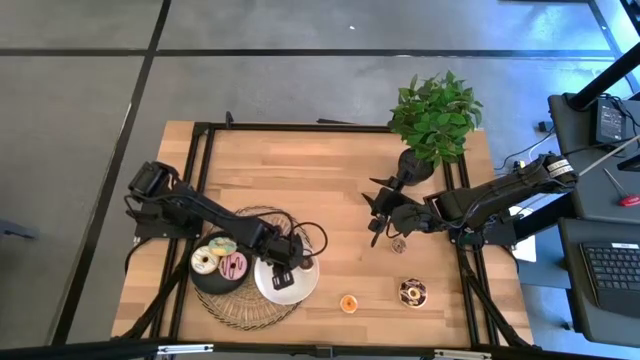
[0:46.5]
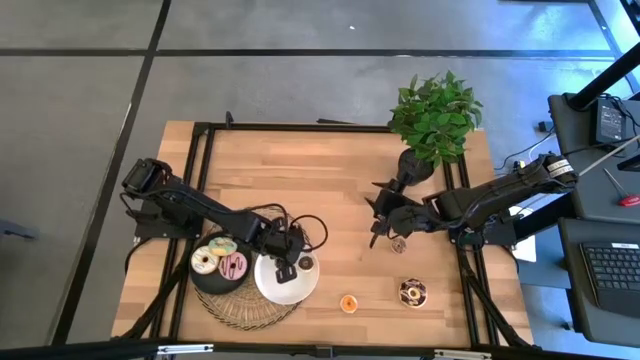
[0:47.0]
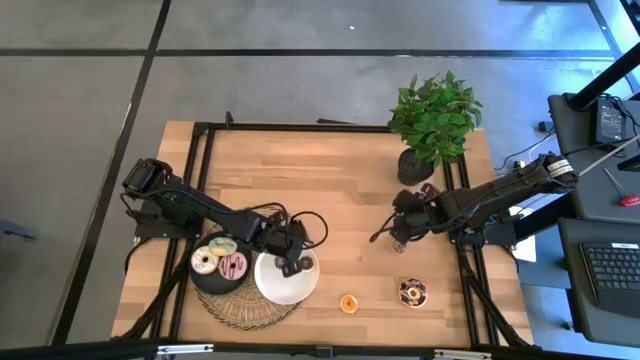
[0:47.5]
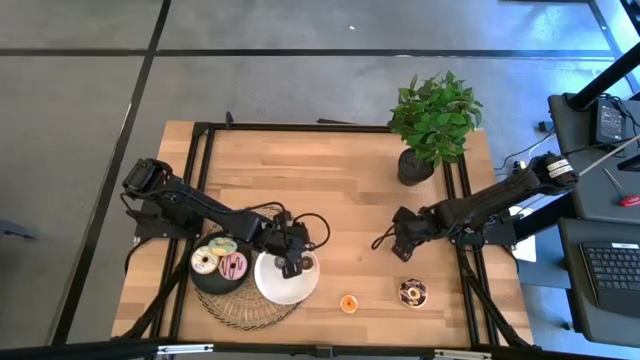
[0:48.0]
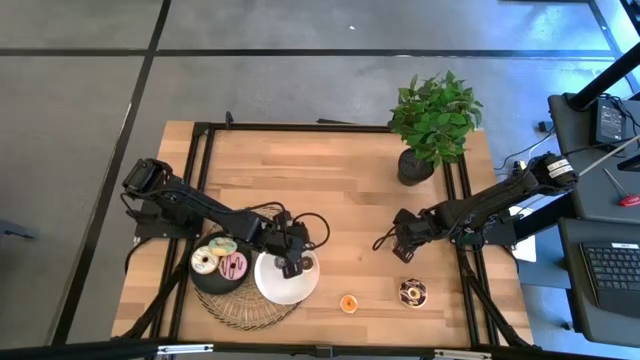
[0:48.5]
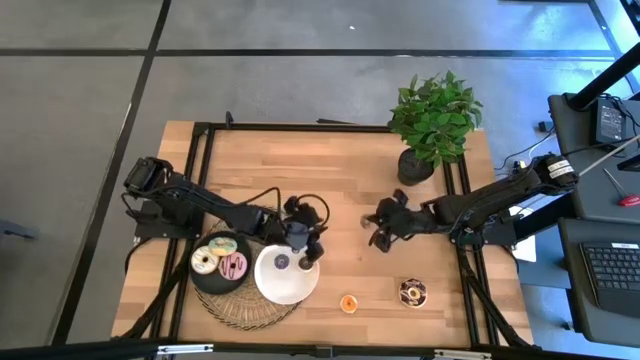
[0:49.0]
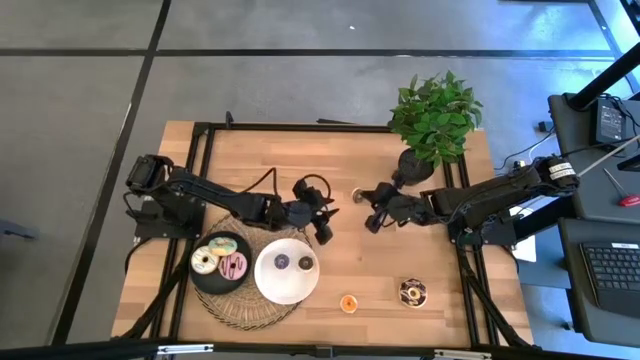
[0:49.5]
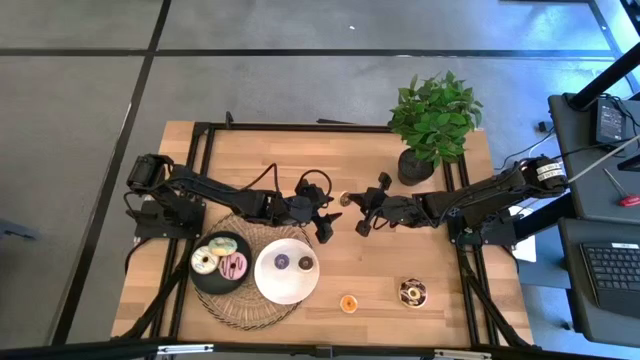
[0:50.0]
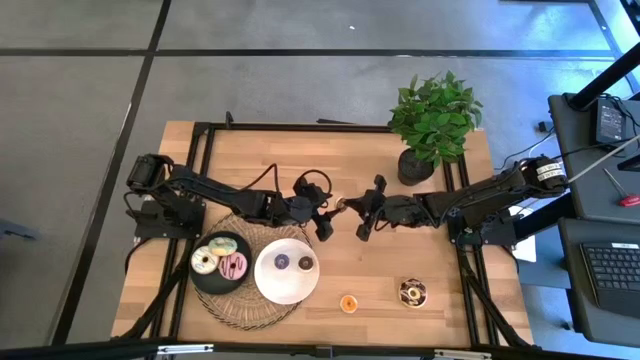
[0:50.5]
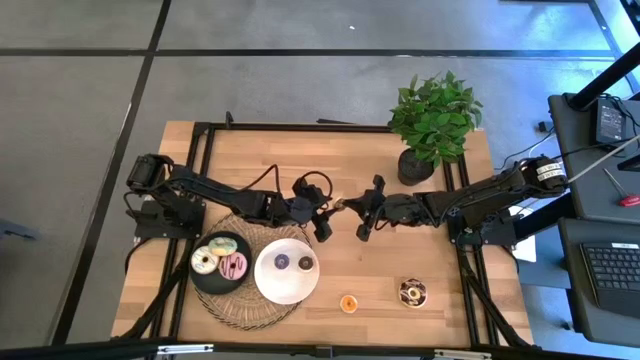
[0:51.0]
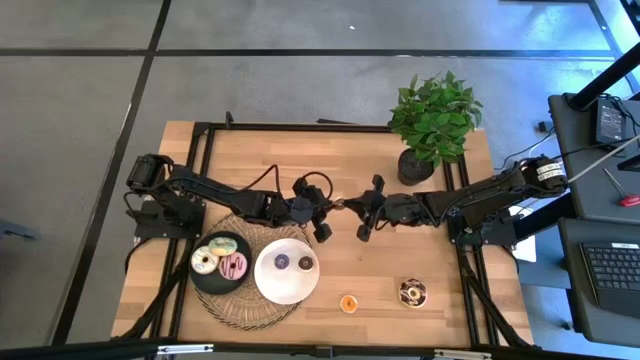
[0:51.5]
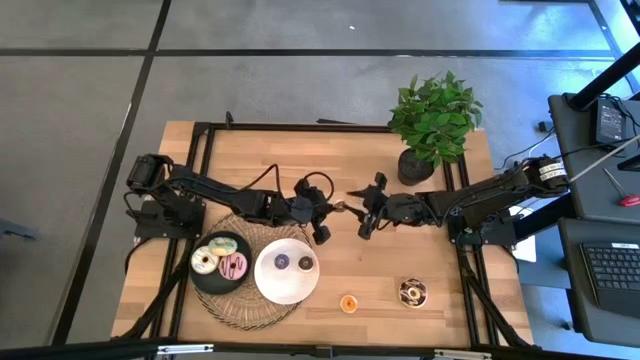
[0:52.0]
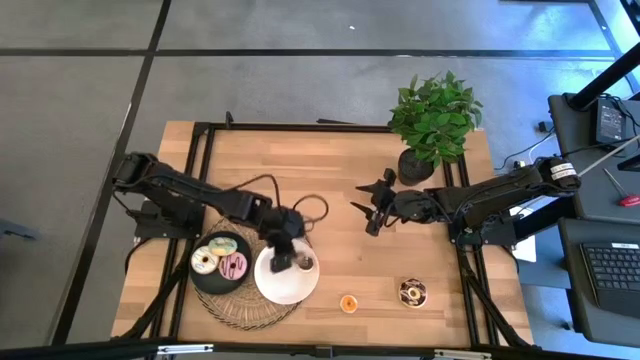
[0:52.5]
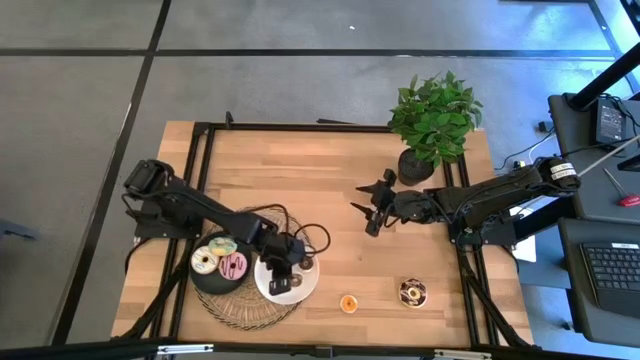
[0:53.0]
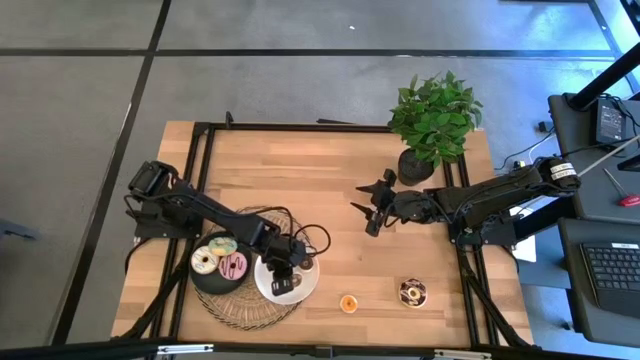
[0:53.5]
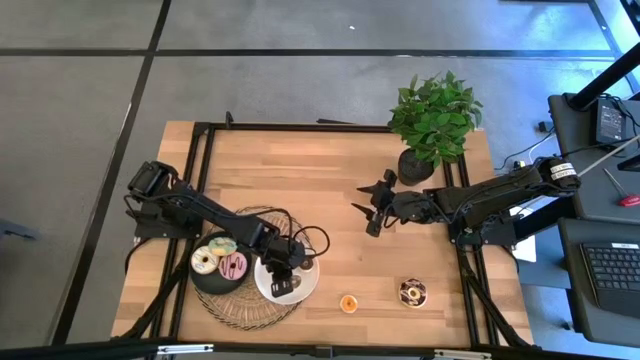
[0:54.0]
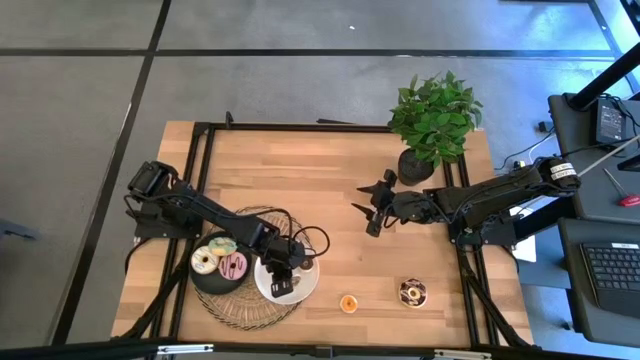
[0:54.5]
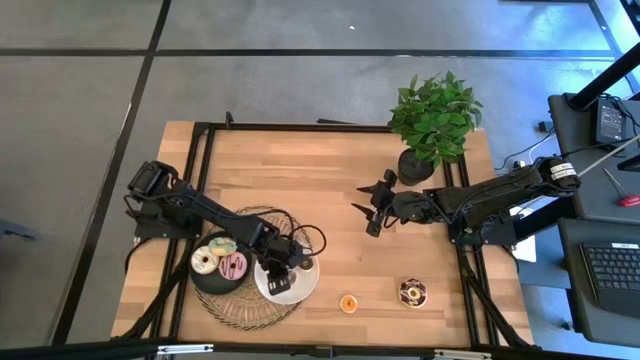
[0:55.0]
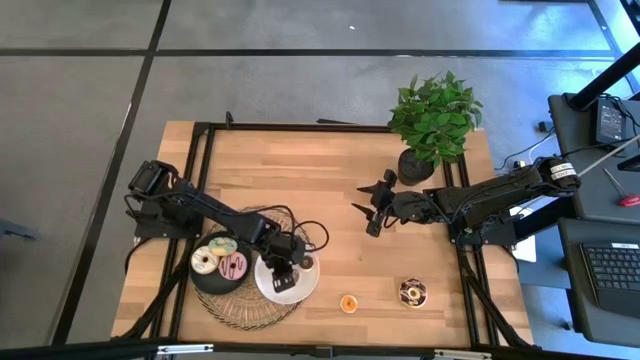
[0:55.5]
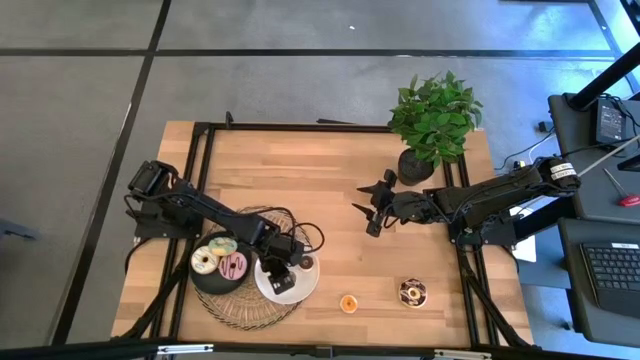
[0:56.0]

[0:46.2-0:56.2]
Task: Pick & Place donuts
Put the small brown donut on the white plate

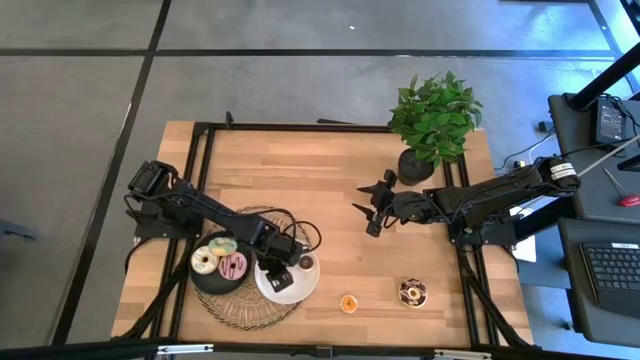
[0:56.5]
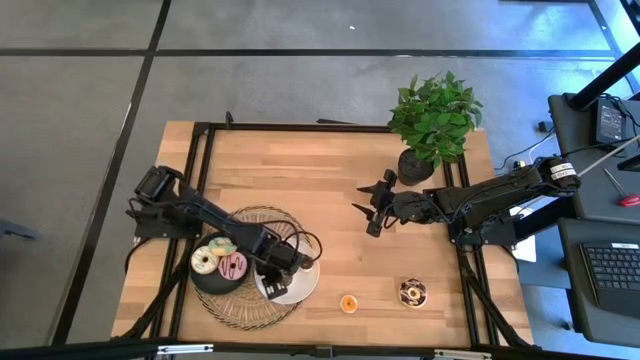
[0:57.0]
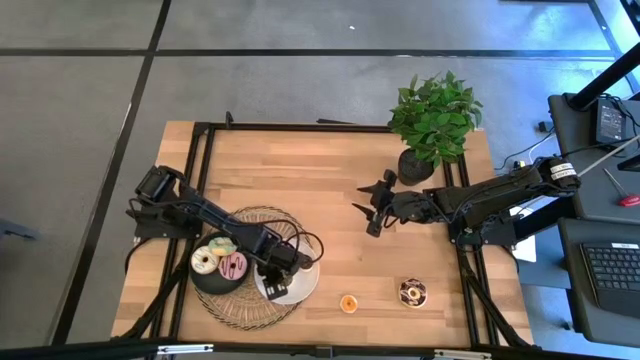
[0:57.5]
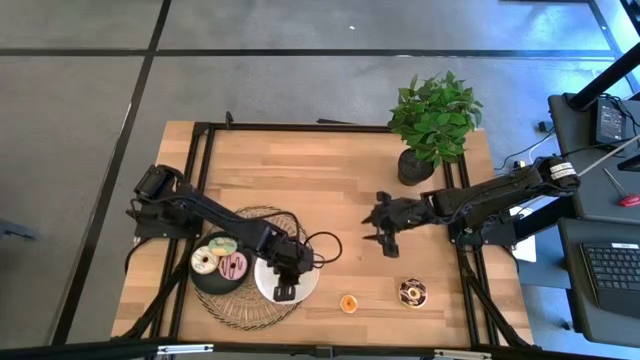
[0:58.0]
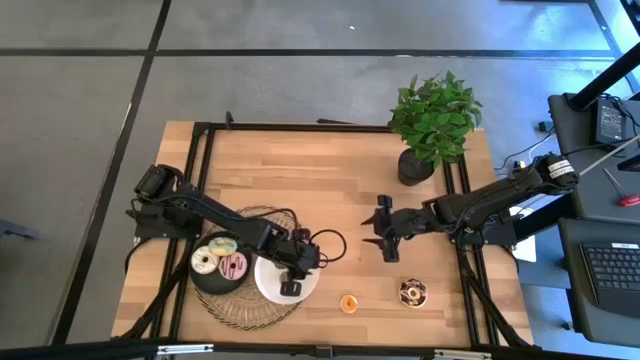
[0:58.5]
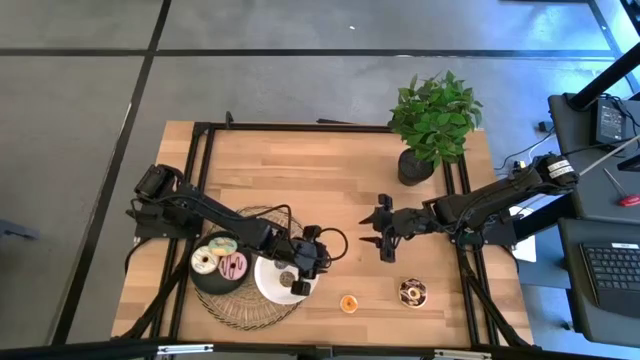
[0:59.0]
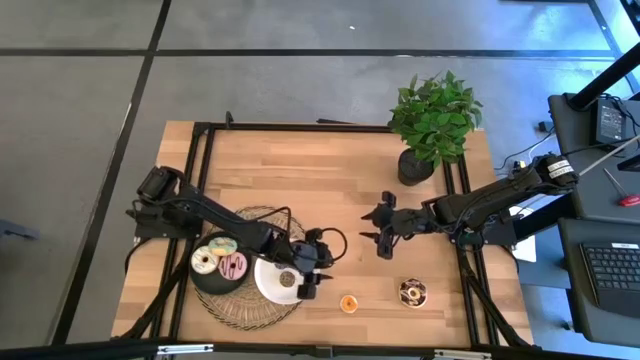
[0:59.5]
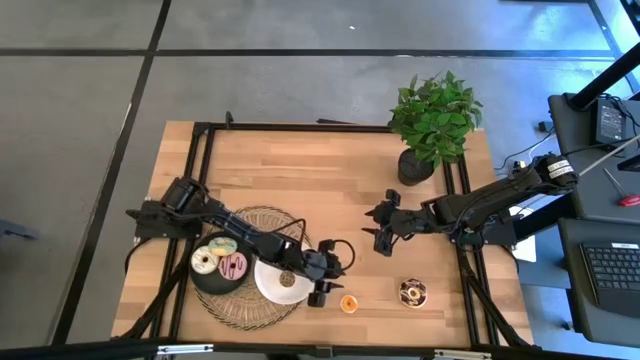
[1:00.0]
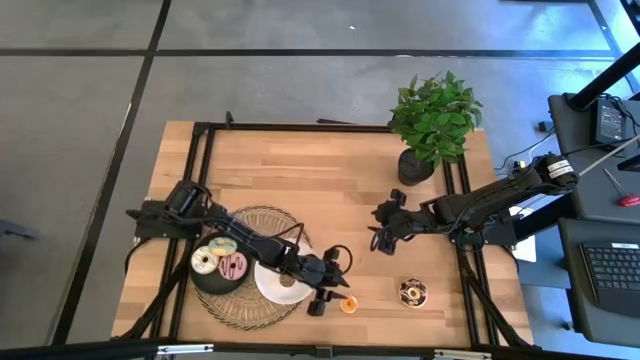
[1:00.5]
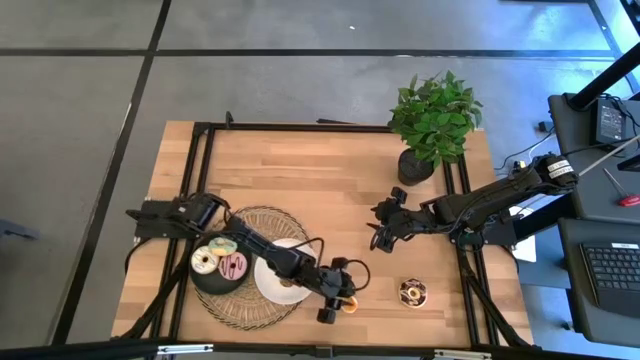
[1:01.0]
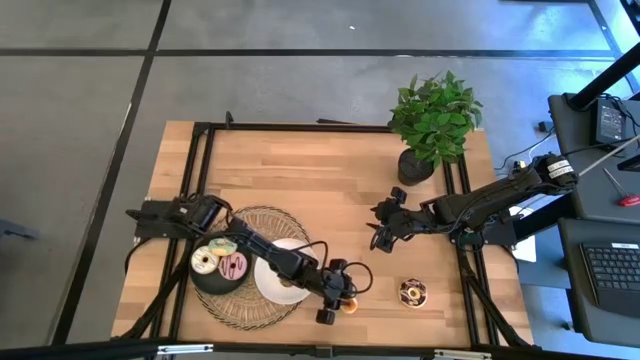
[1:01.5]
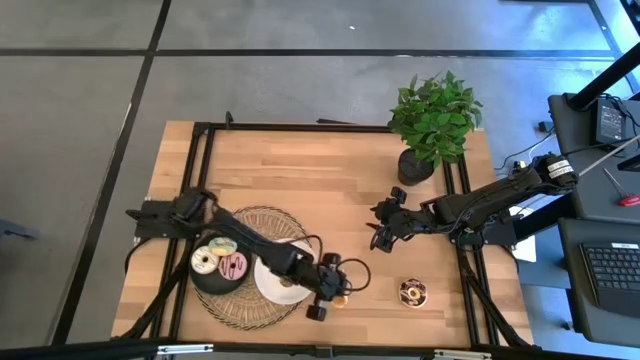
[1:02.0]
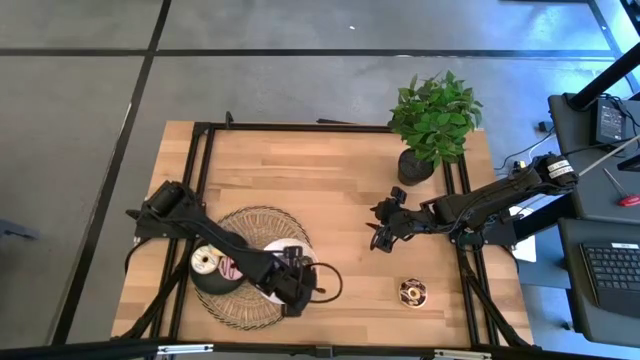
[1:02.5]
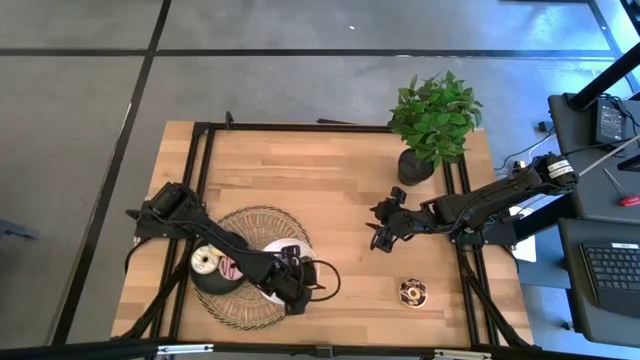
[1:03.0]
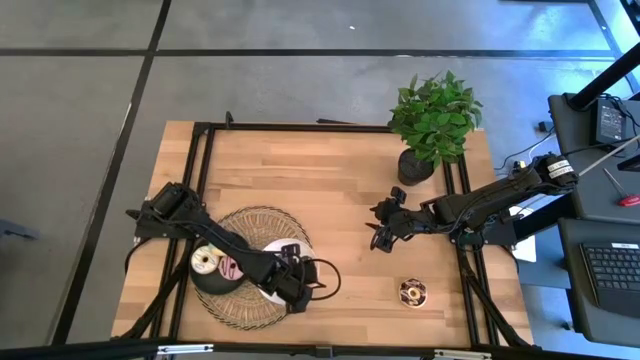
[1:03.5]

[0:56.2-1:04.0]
Put the small yellow donut on the white plate

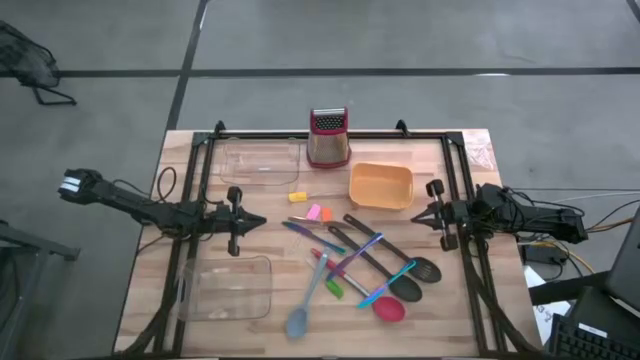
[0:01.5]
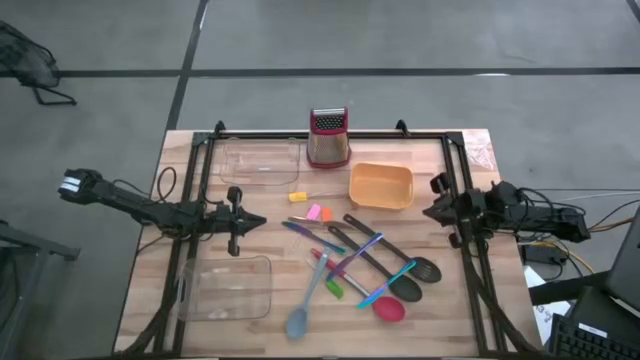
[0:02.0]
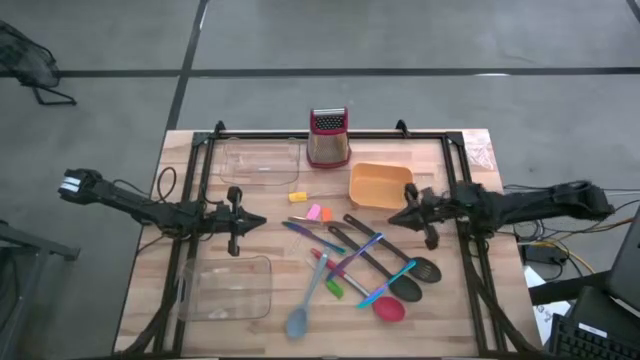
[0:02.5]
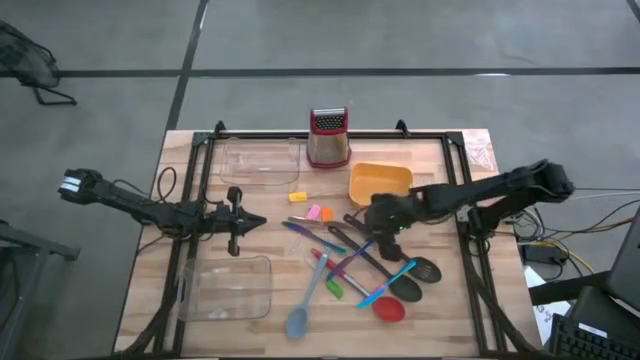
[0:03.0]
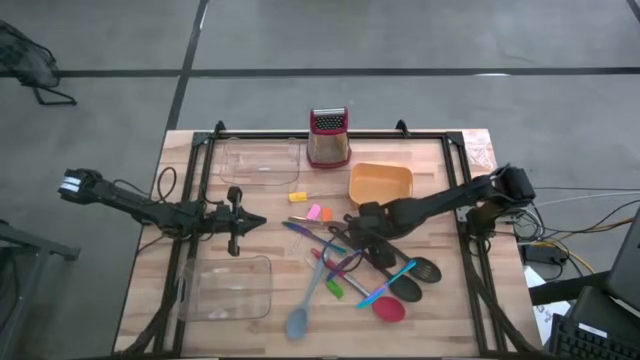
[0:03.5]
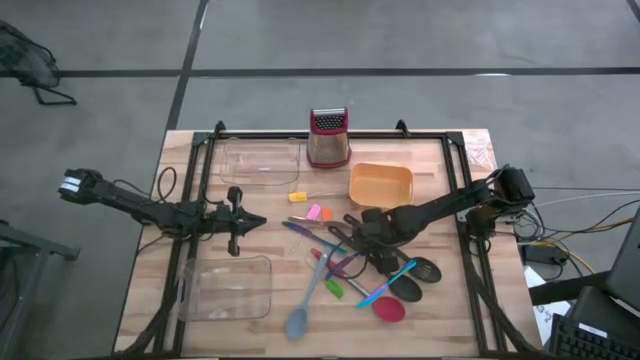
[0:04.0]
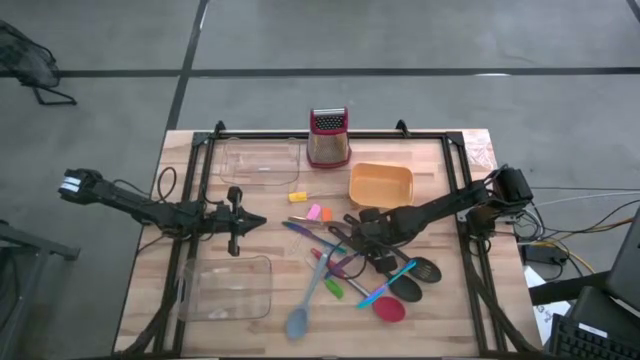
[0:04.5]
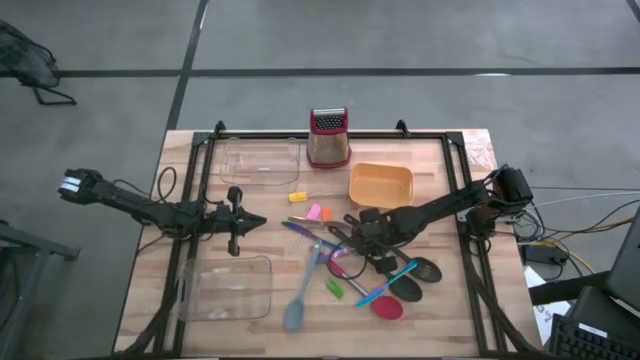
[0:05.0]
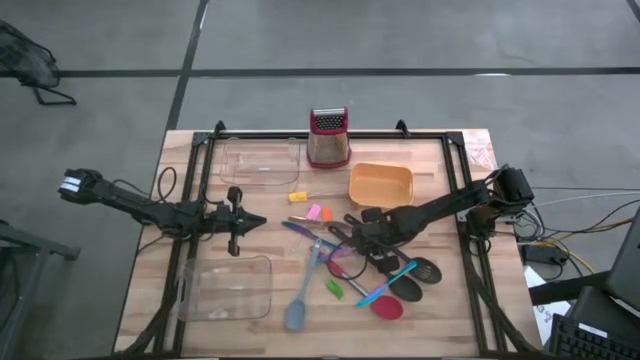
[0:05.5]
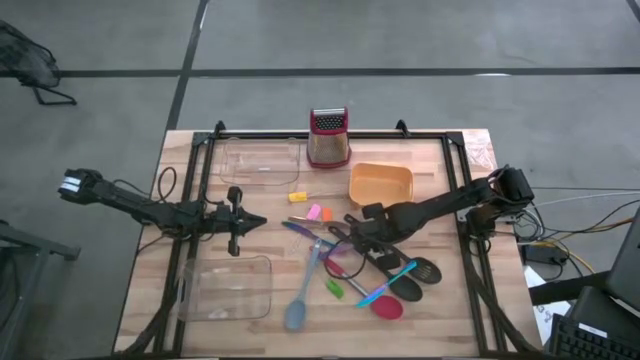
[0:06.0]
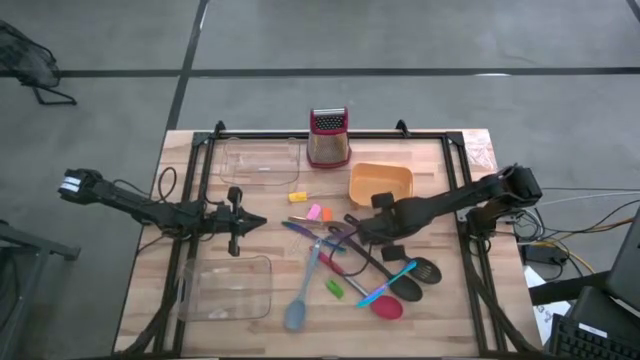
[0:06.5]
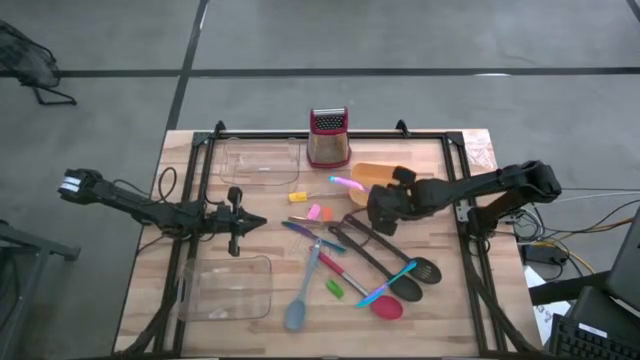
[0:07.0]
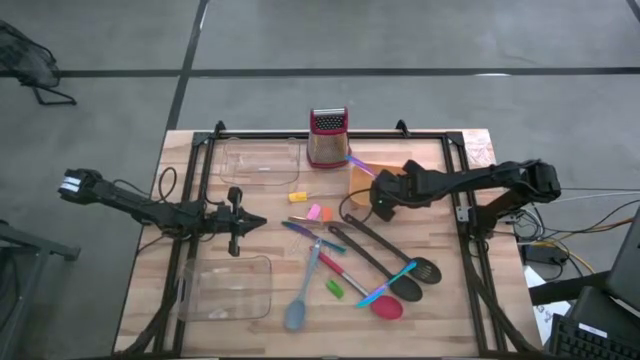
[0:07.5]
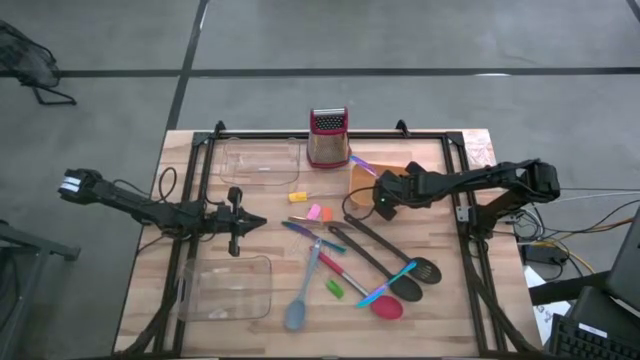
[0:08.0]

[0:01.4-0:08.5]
Task: Pick & Place Kitchen Items
Put the middle blue knife into the yellow bin
